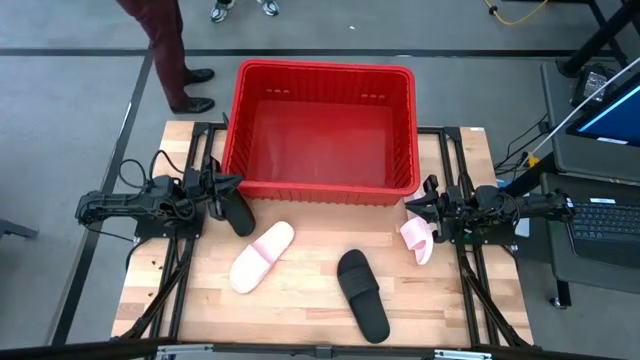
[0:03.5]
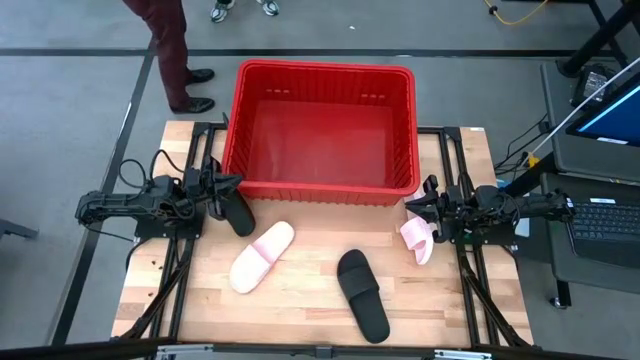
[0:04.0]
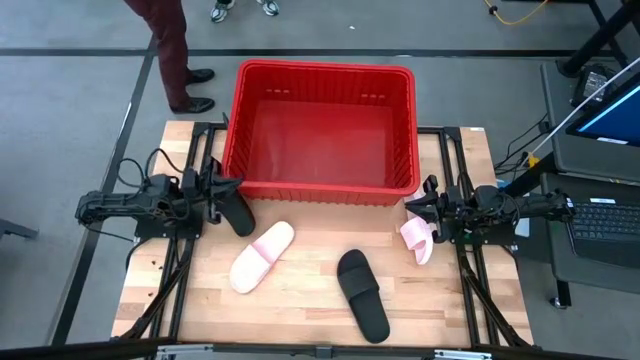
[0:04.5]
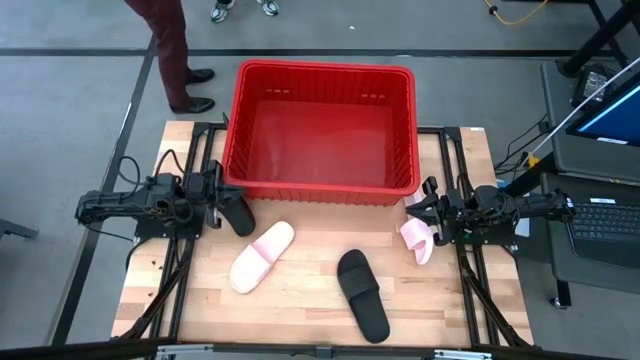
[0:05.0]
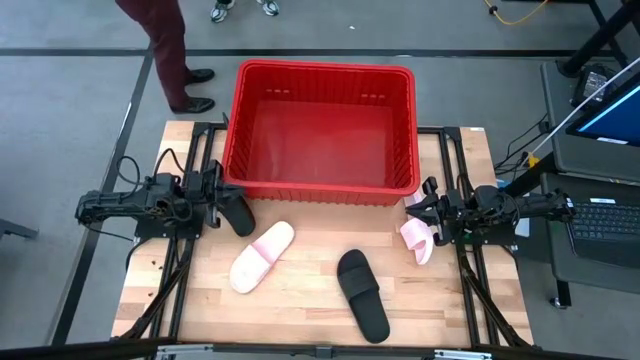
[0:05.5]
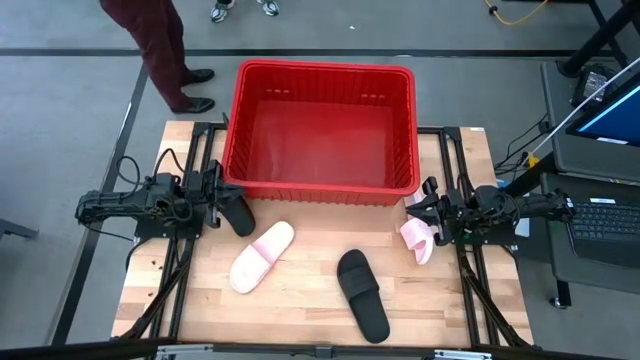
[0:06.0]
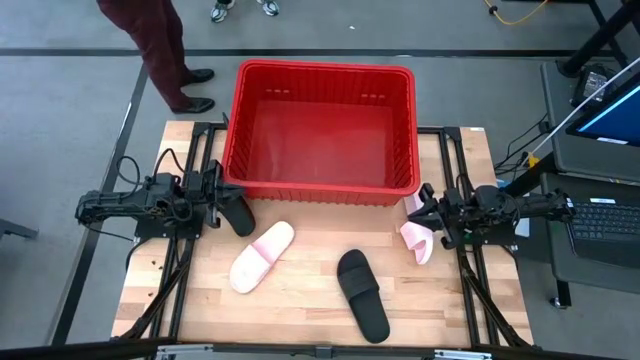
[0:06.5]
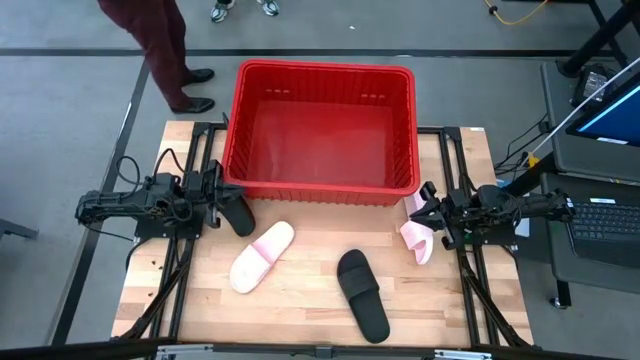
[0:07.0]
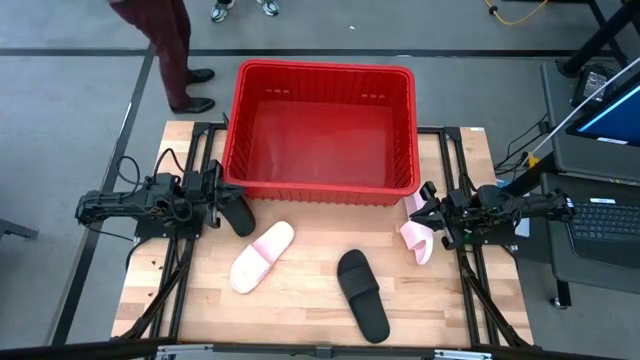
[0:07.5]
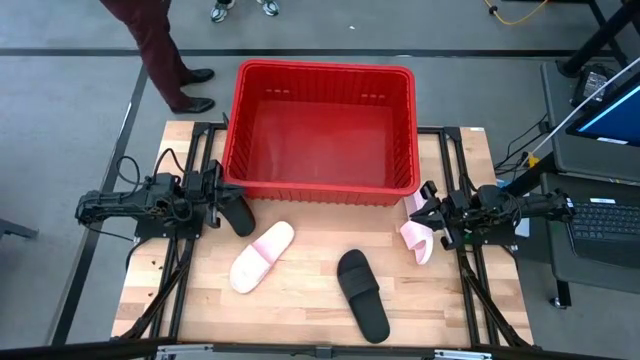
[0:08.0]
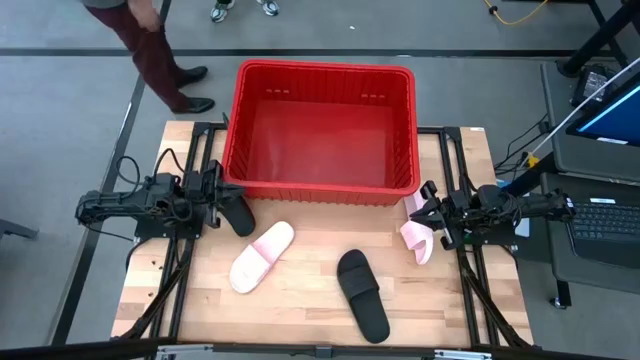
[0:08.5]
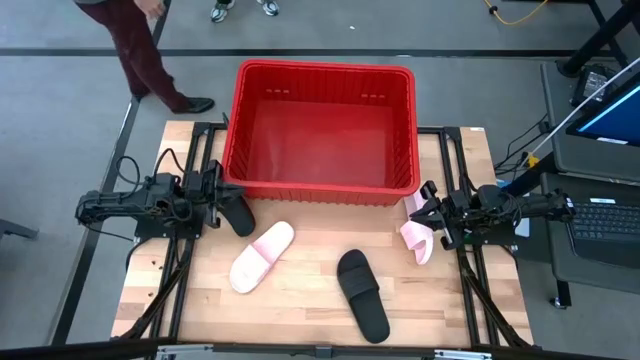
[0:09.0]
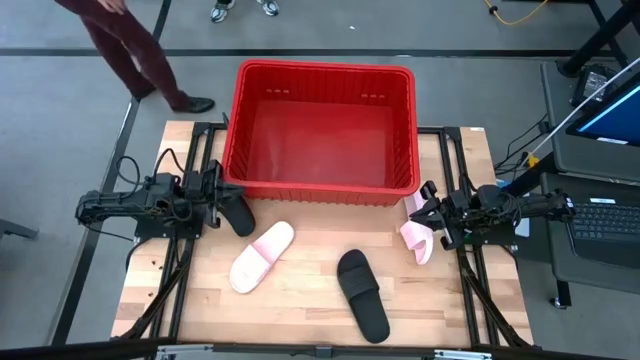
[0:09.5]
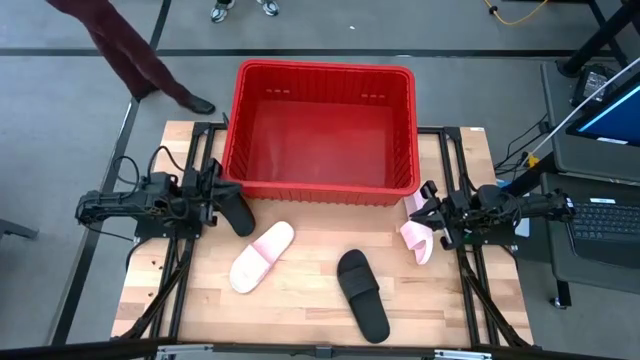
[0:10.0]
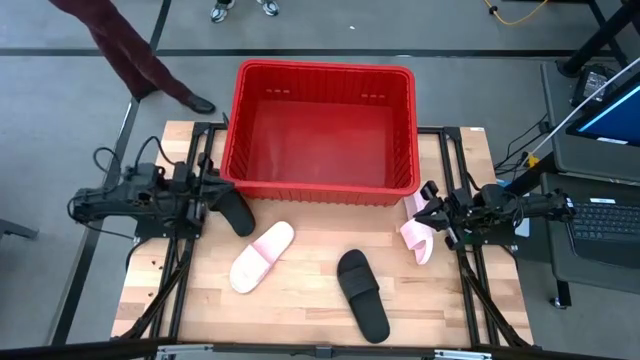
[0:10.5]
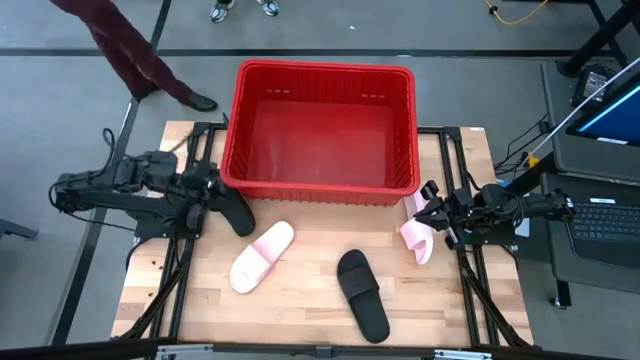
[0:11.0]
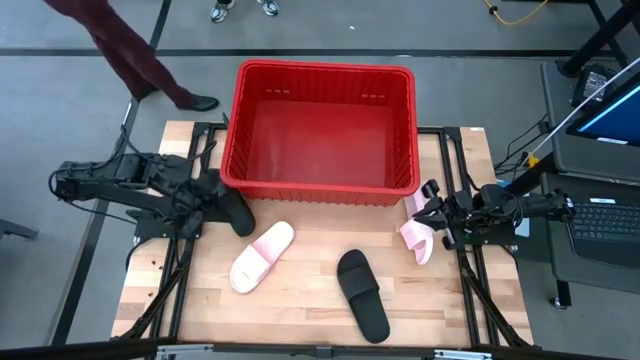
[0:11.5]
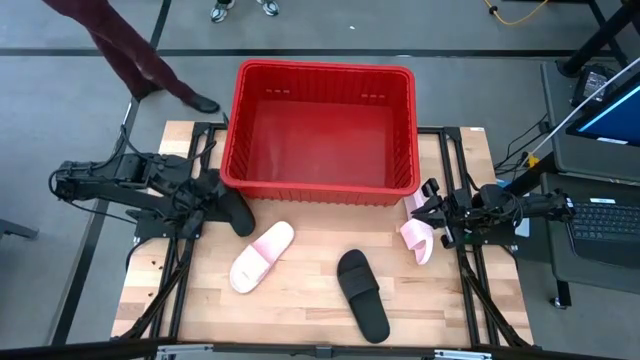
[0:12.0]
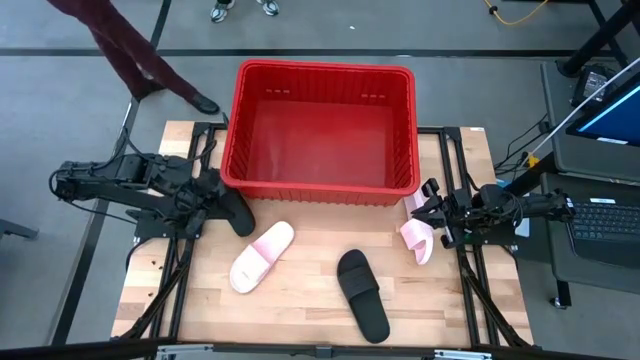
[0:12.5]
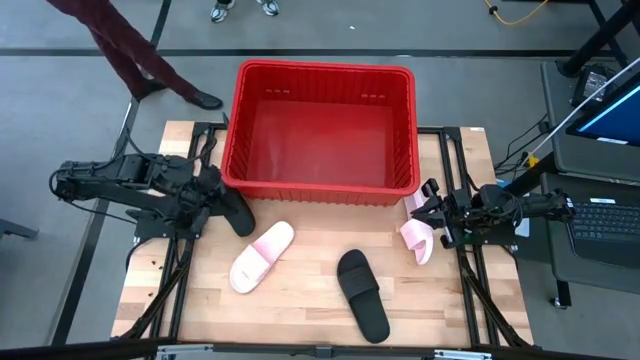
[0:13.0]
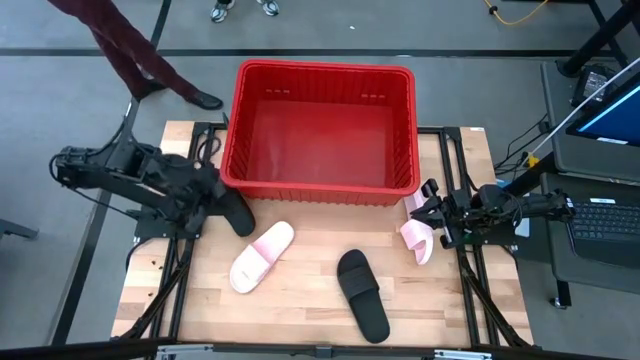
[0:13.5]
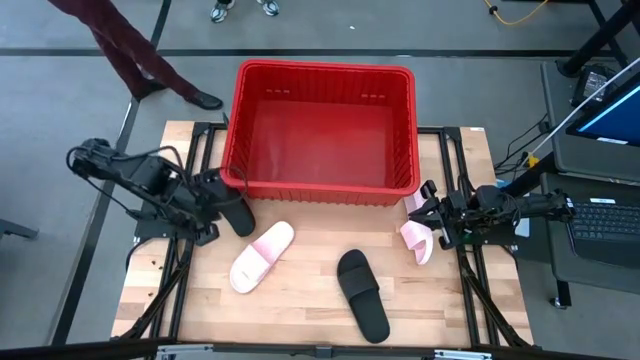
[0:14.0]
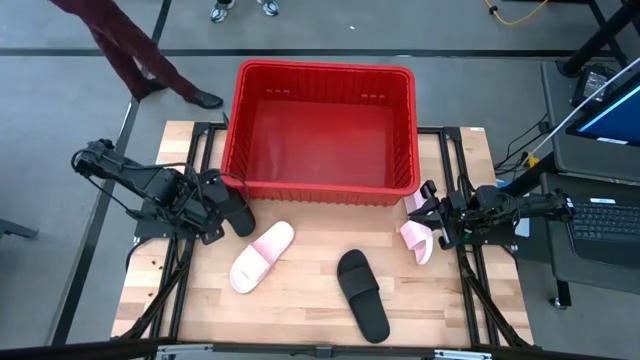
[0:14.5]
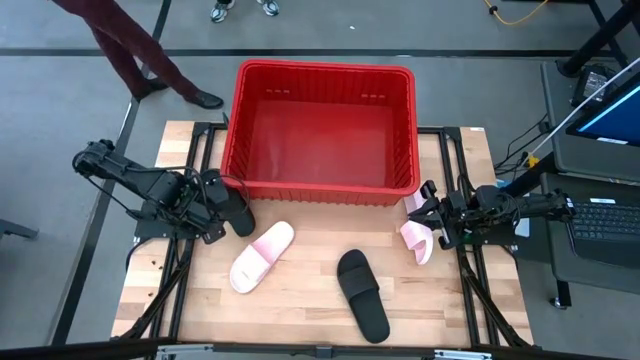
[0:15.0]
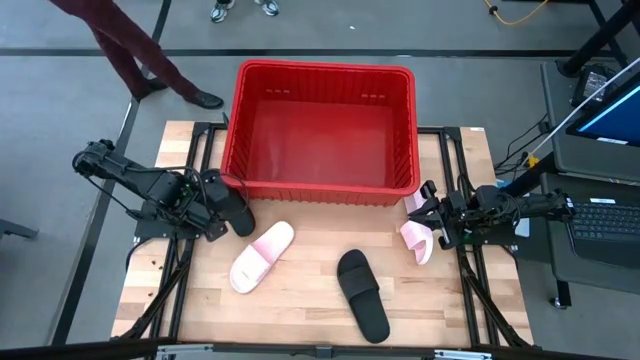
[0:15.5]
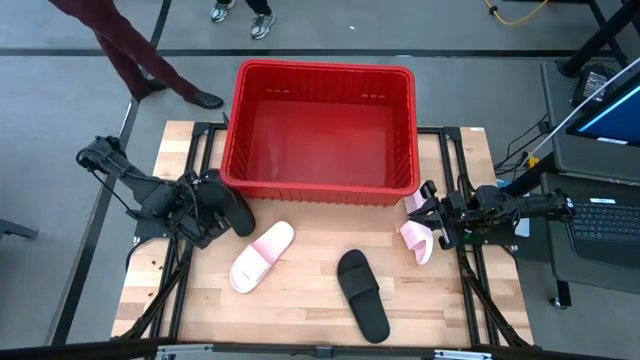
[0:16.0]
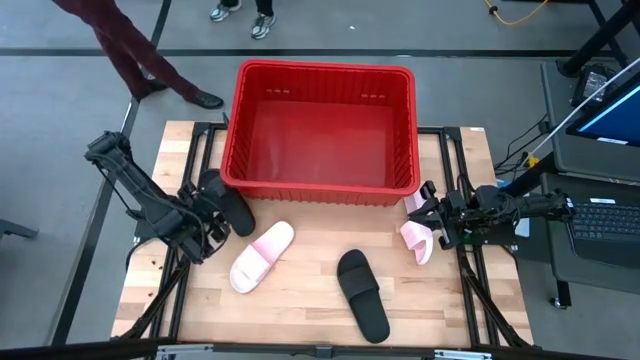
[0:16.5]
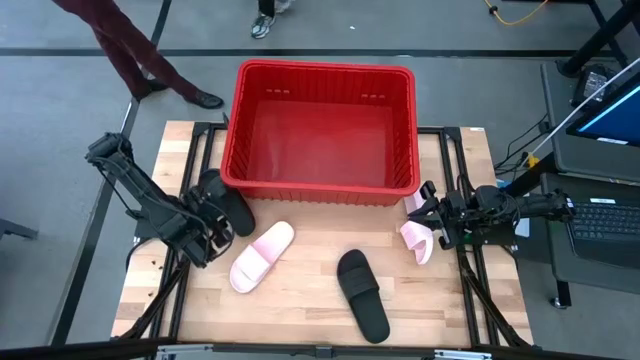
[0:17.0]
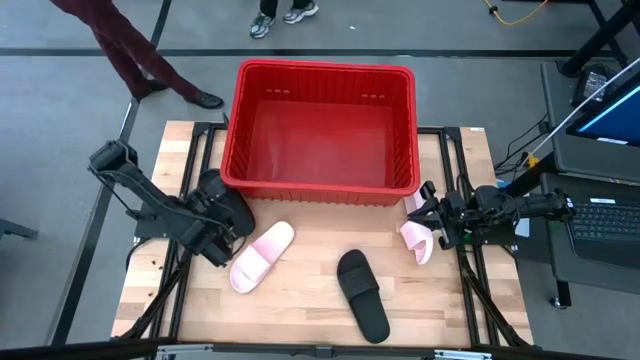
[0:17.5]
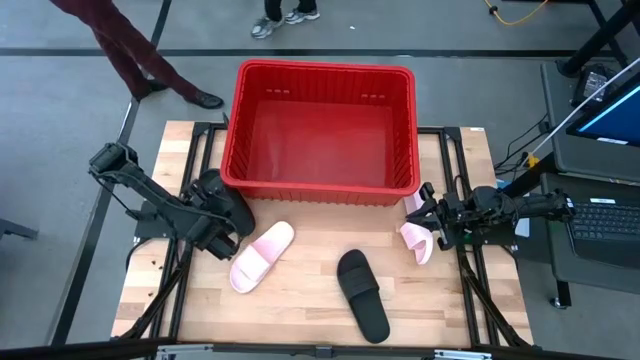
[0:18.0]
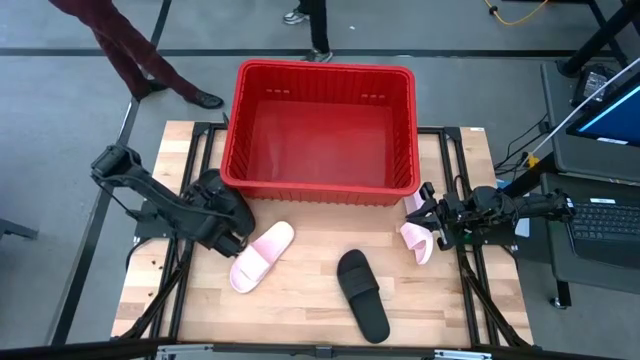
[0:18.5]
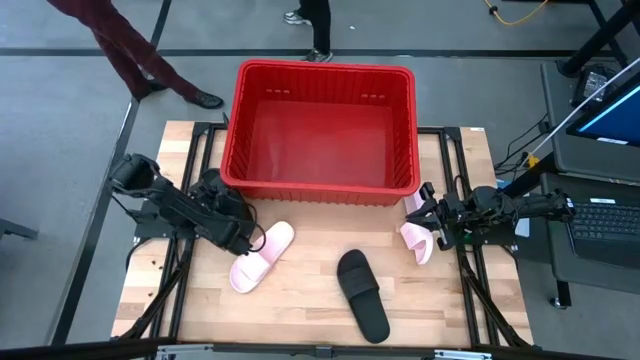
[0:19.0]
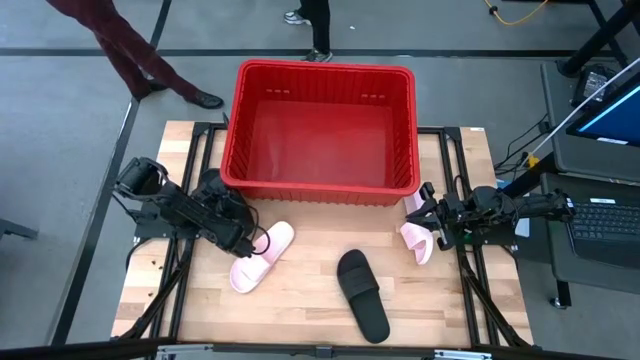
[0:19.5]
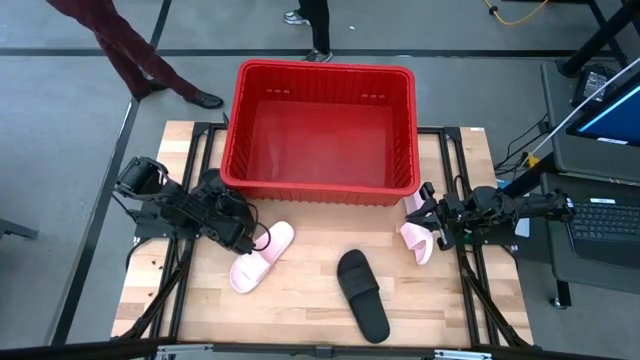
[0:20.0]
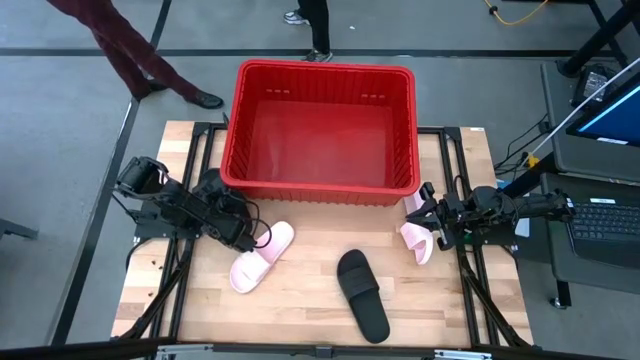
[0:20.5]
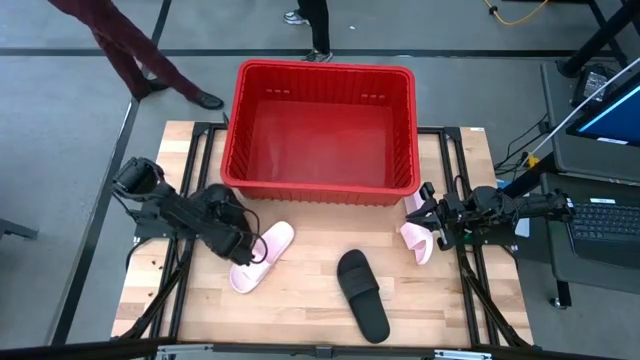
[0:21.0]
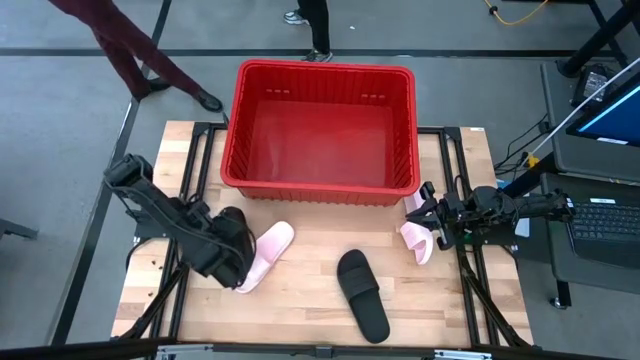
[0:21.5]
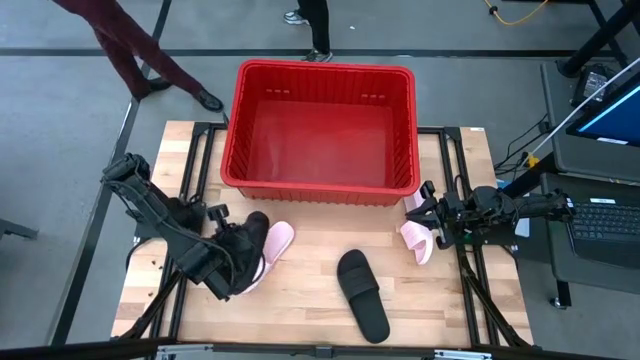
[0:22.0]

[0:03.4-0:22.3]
Task: Pick and place slides into bin
Put the top black slipper into the red bin
